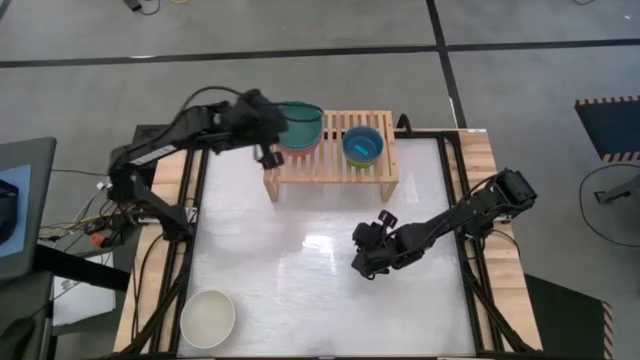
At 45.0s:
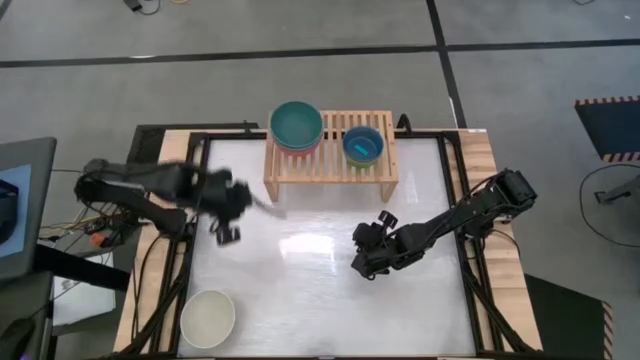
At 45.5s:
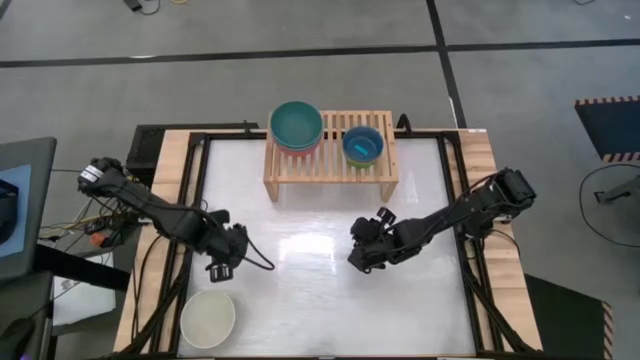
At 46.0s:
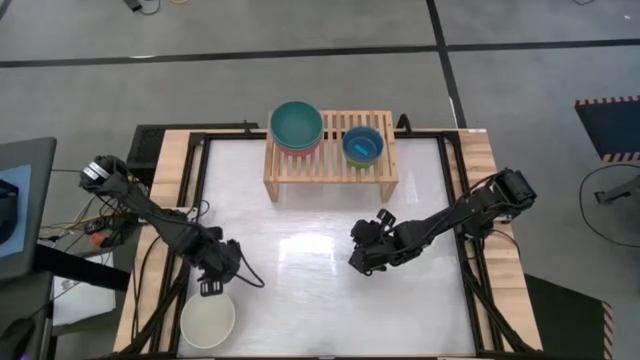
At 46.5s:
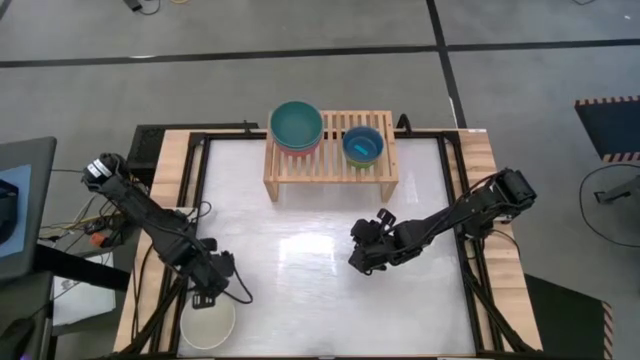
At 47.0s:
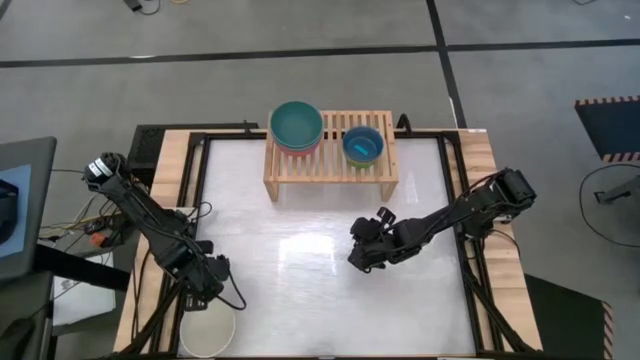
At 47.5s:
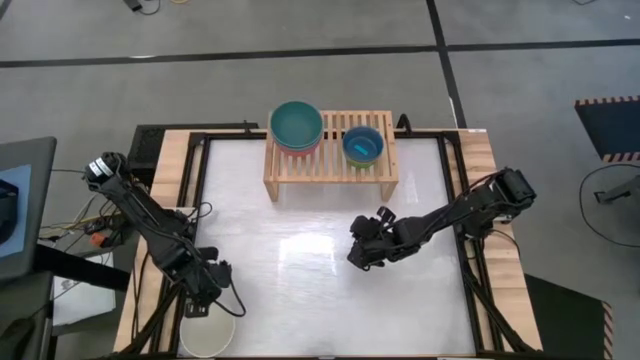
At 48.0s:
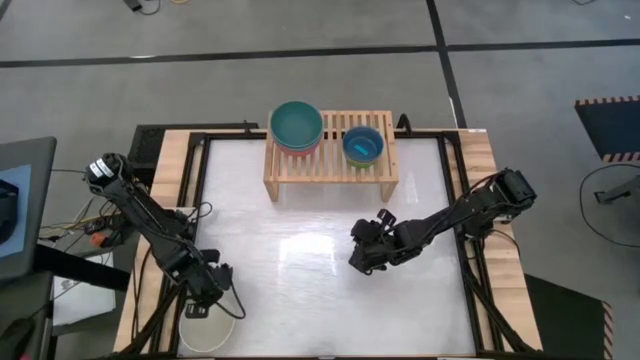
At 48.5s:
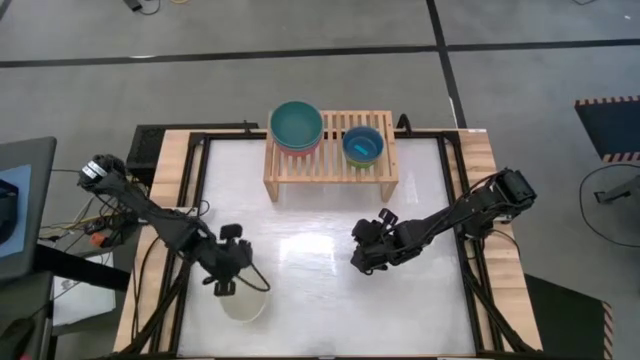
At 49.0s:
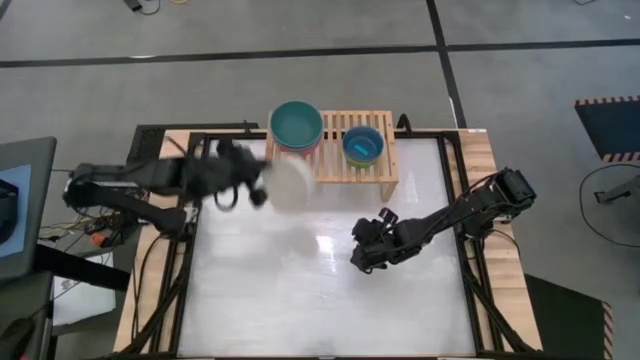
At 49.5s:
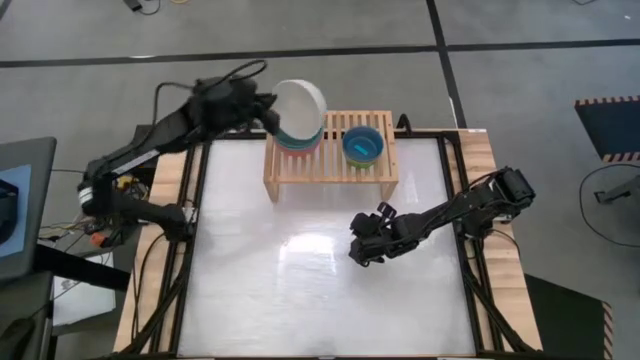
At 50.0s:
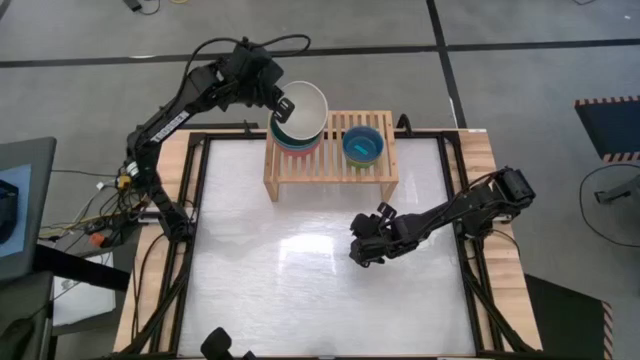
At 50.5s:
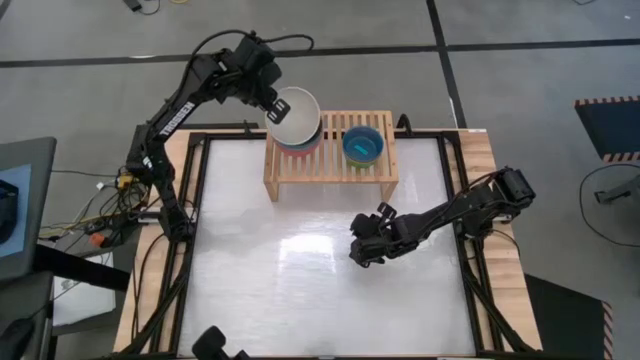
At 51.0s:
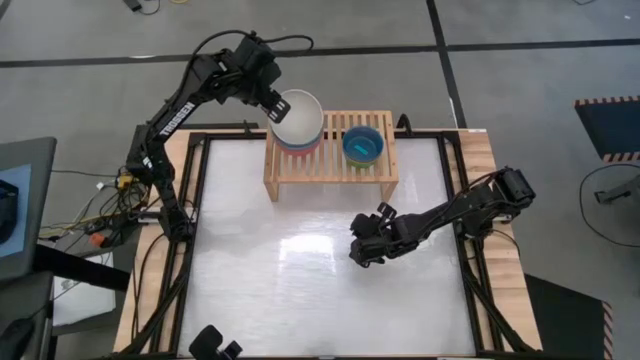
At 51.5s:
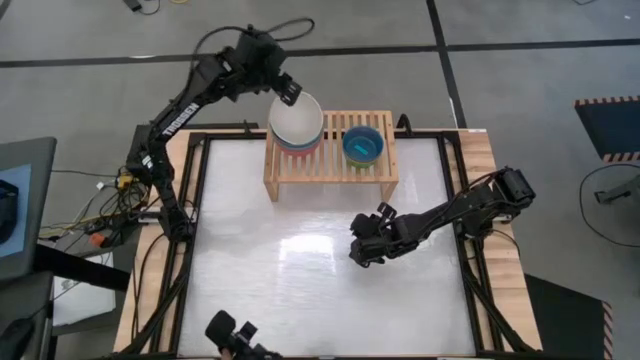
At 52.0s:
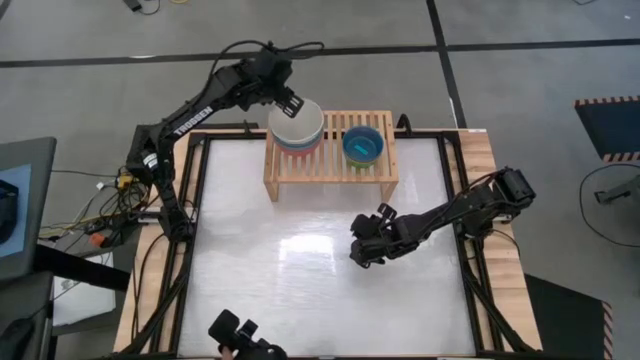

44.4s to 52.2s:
Task: Place and stack bowls onto a shelf
Stack the white bowl on top of the green bowl on the shelf

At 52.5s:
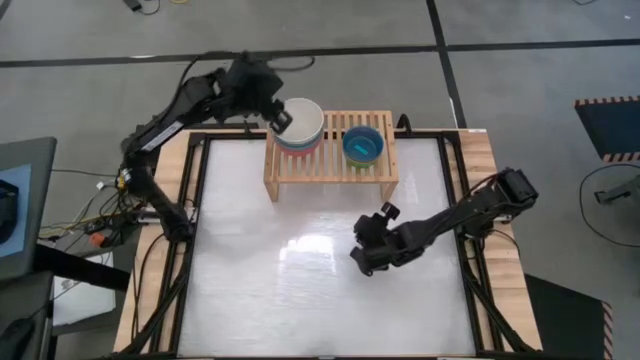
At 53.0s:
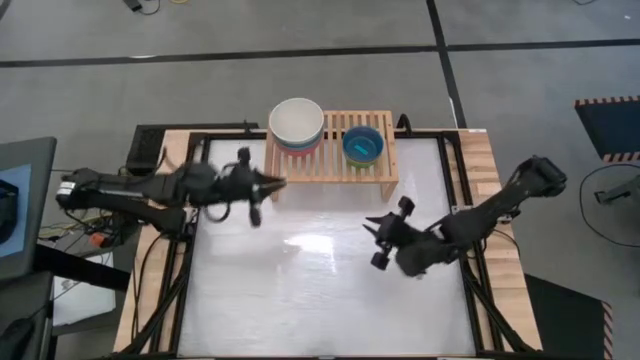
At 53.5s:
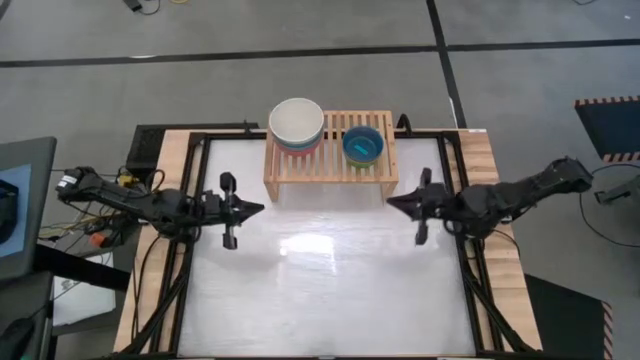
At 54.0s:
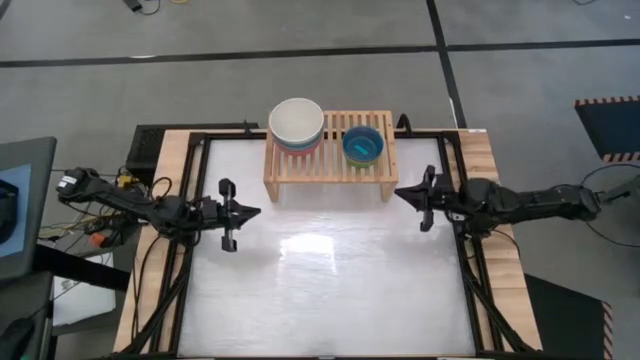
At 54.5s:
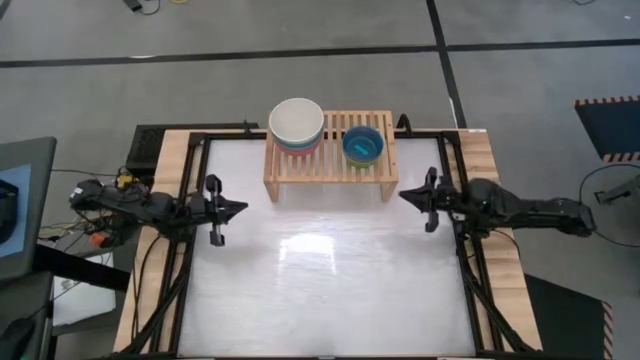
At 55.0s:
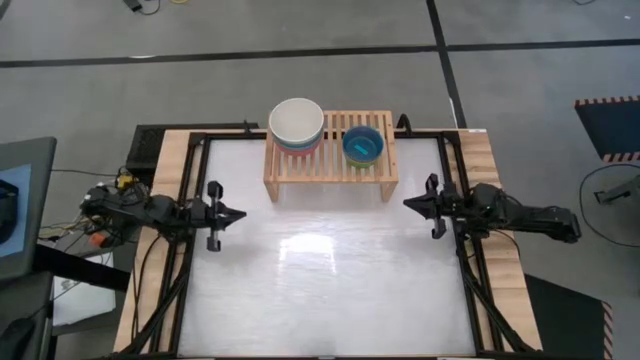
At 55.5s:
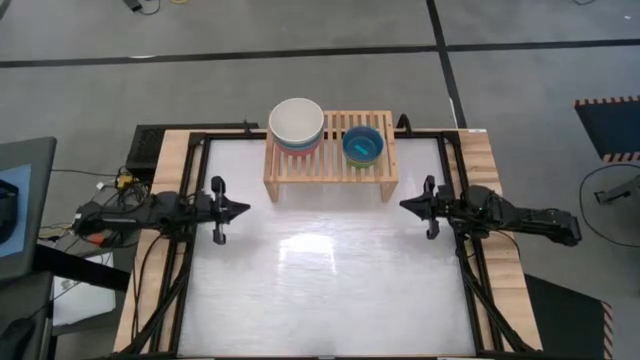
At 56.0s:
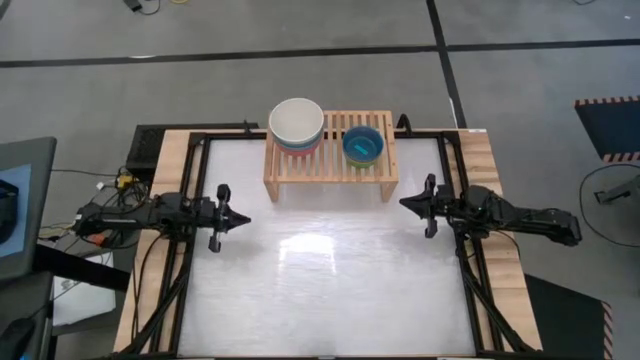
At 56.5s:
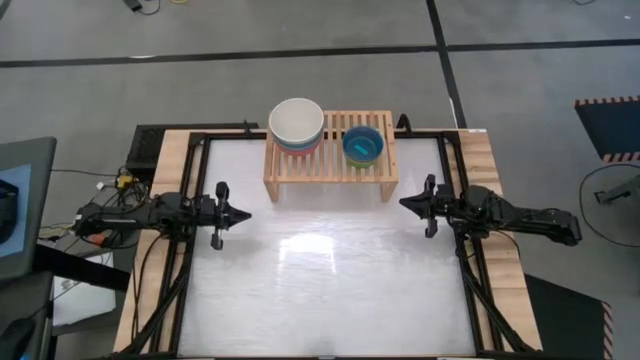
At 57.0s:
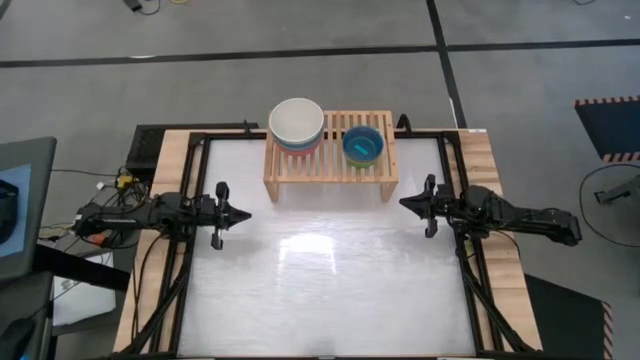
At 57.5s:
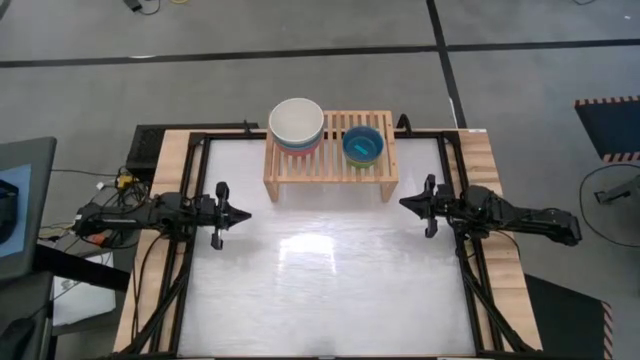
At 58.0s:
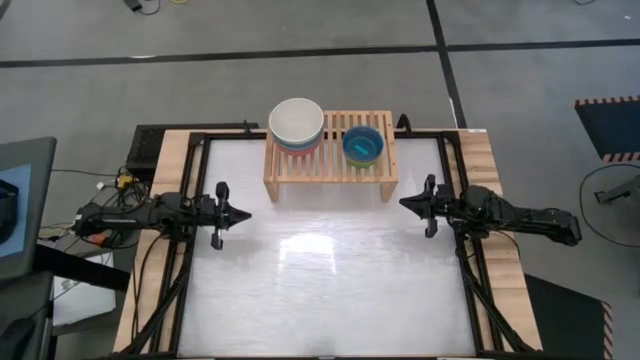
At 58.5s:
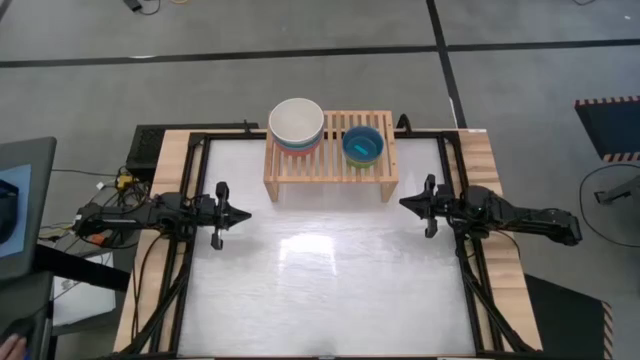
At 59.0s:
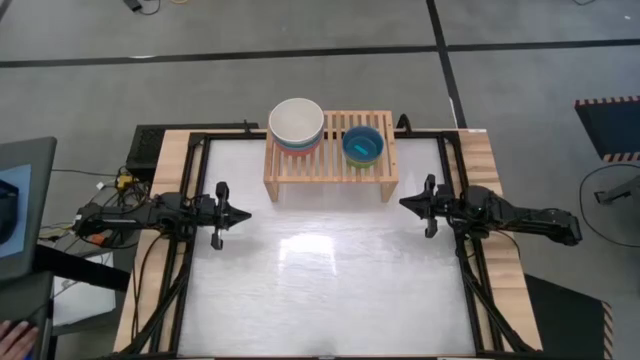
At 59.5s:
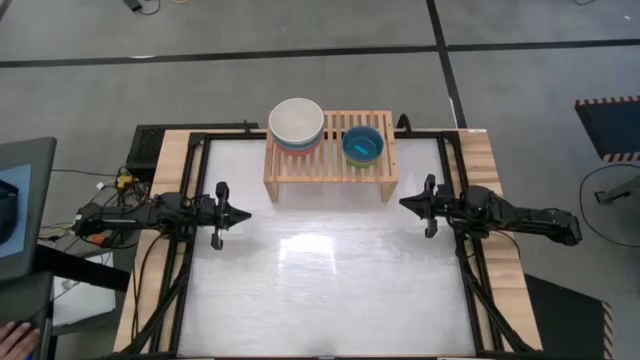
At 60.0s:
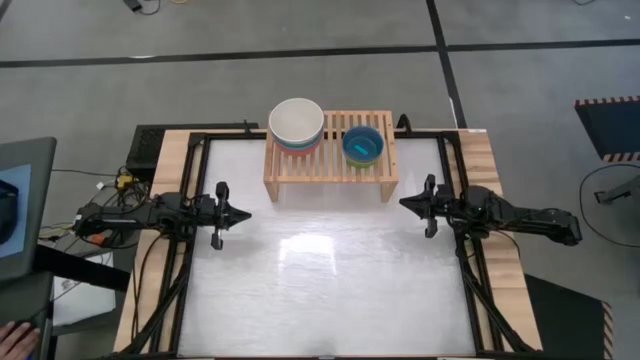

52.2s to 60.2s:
Return to Home Position

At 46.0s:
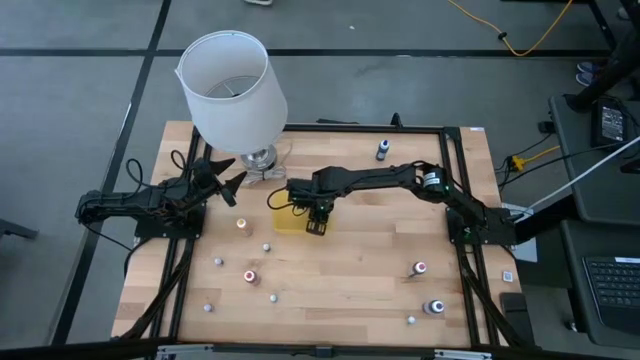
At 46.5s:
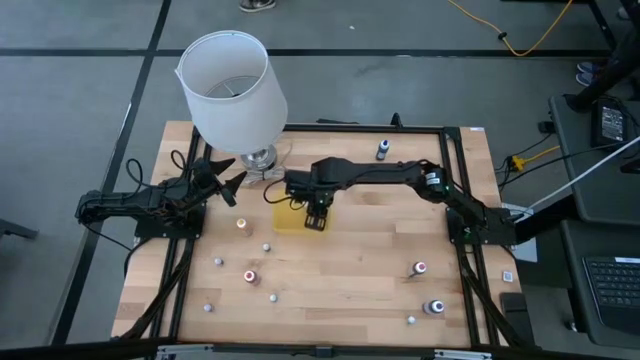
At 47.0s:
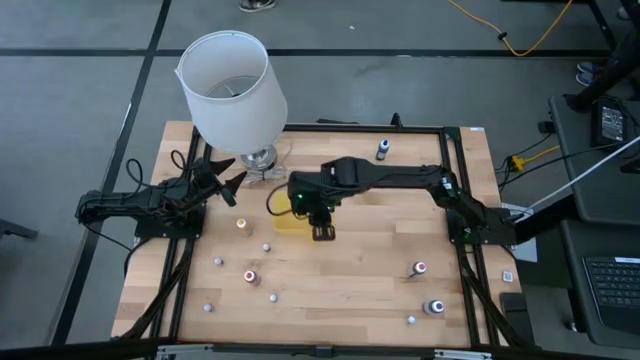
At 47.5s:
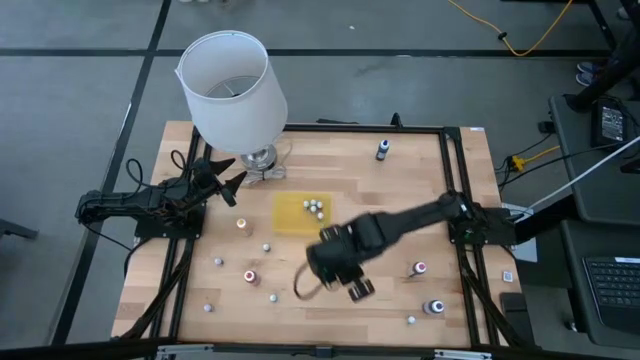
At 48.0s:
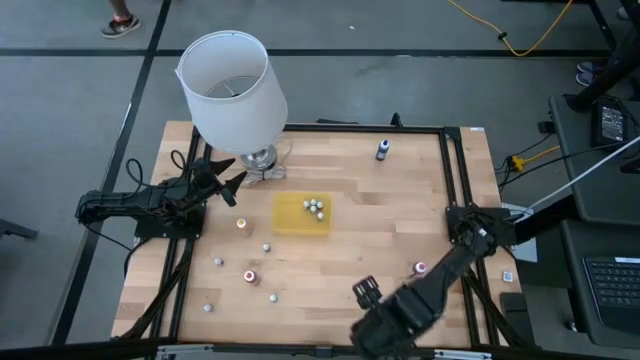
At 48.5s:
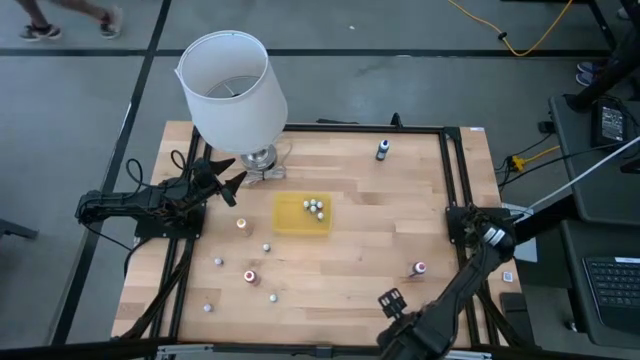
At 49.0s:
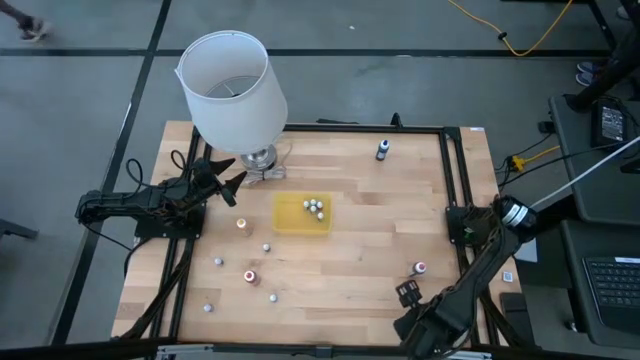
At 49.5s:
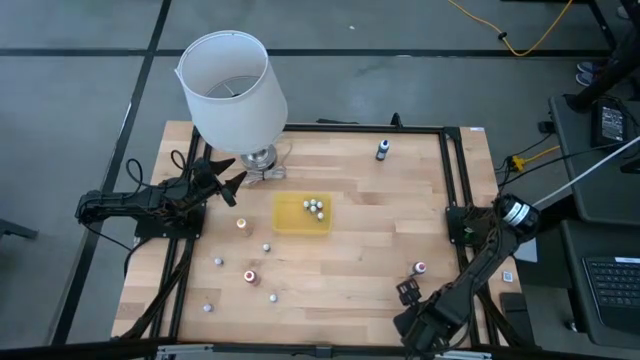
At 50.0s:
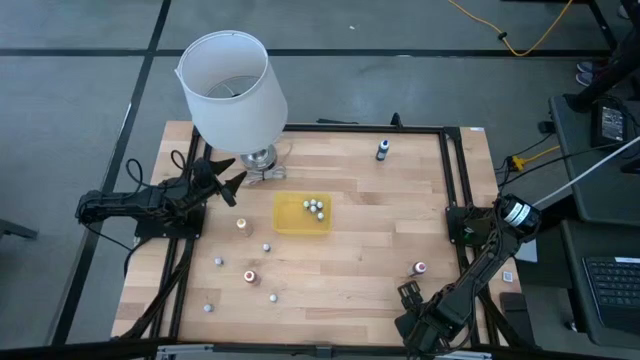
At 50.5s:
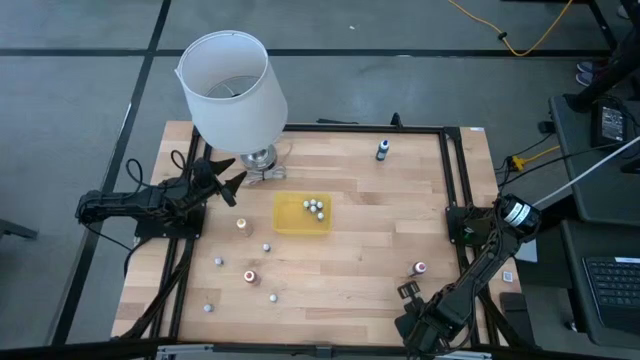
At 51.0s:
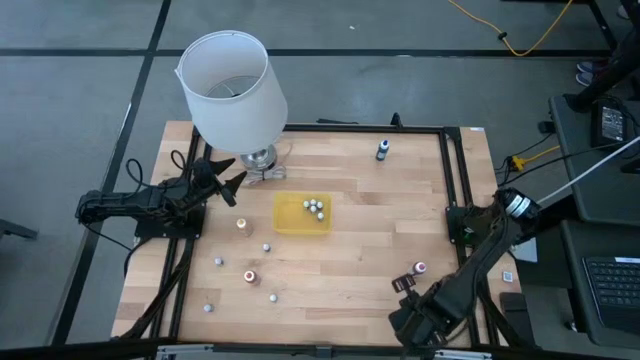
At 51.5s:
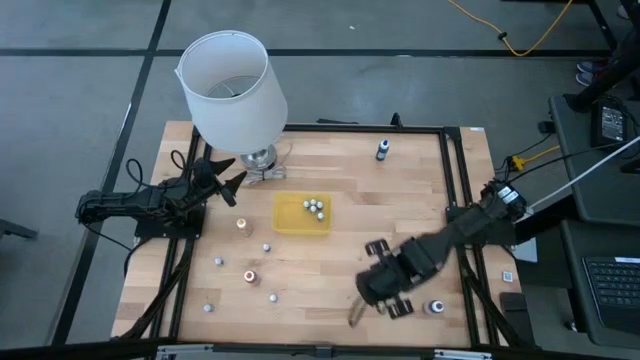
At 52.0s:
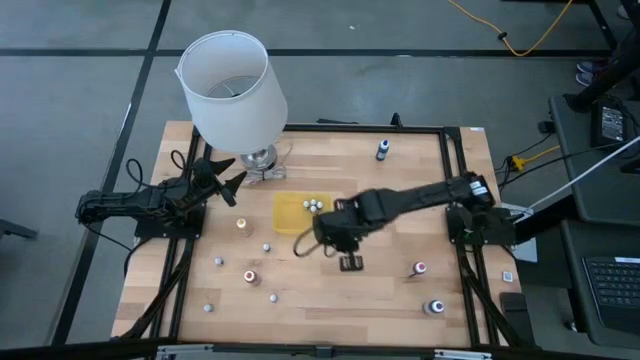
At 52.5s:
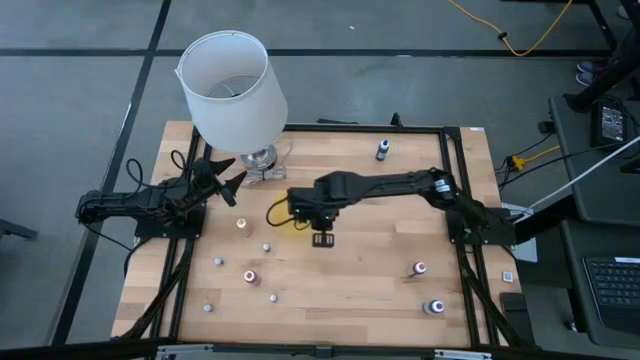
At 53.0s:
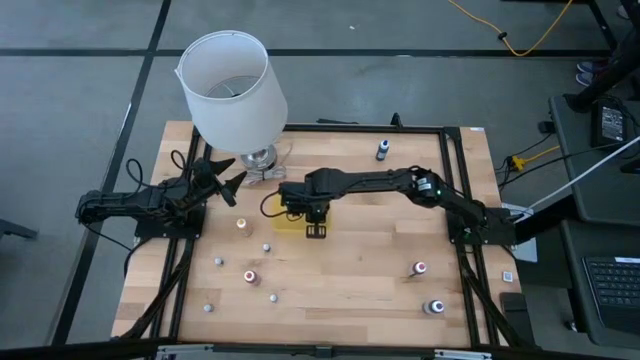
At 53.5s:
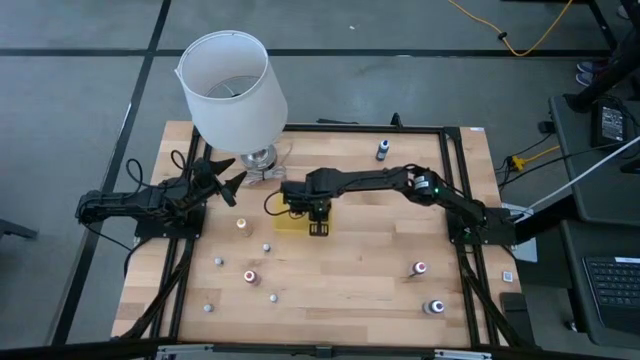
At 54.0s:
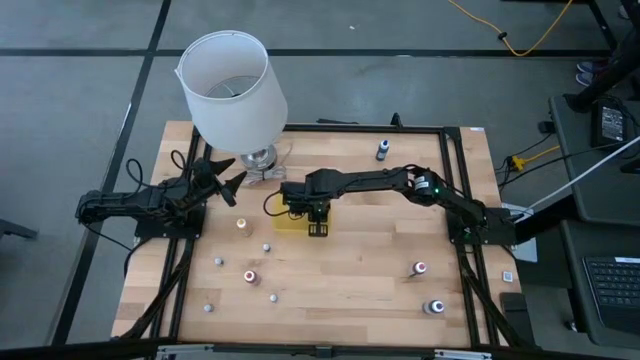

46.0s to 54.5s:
Task: Pick & Place food coloring
Put the black food coloring bottle into the yellow bin
